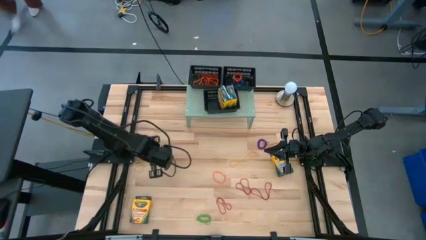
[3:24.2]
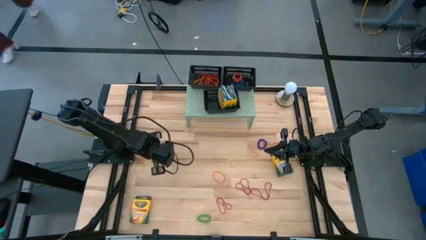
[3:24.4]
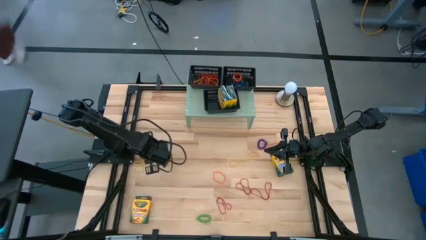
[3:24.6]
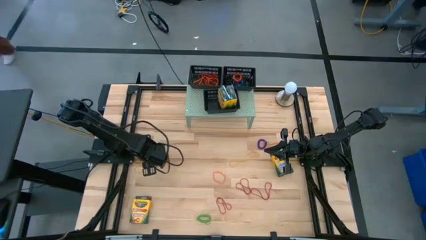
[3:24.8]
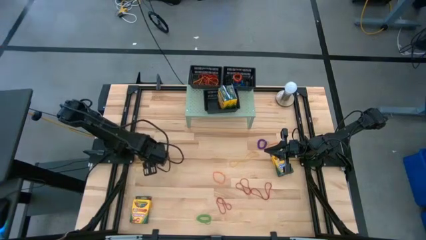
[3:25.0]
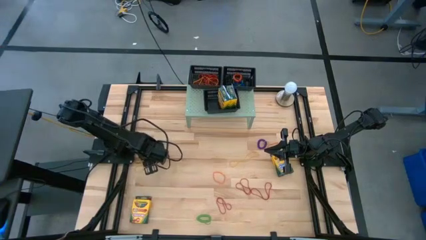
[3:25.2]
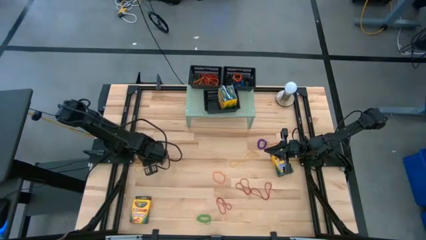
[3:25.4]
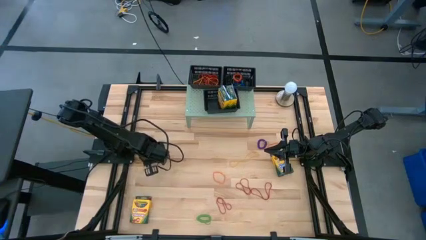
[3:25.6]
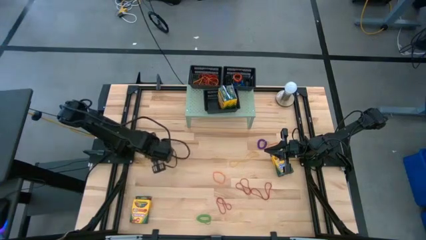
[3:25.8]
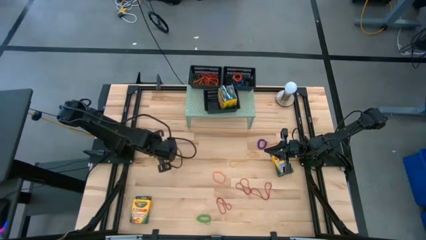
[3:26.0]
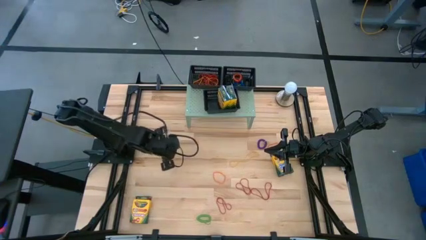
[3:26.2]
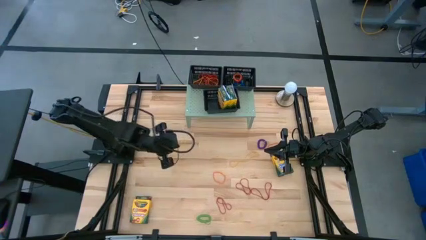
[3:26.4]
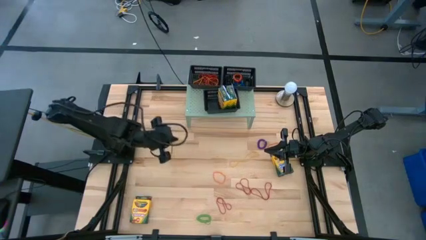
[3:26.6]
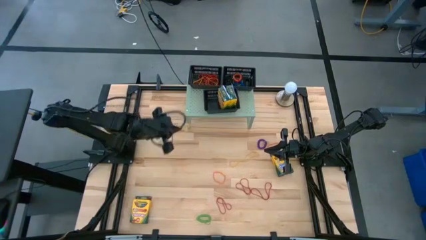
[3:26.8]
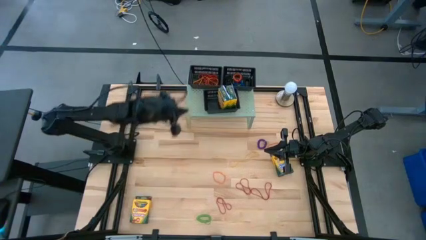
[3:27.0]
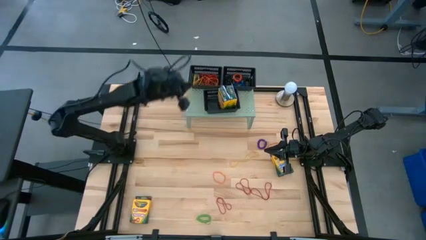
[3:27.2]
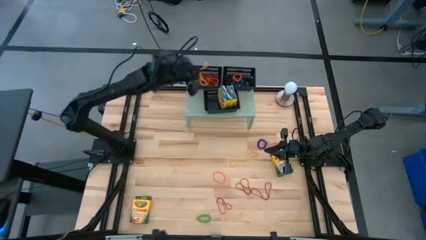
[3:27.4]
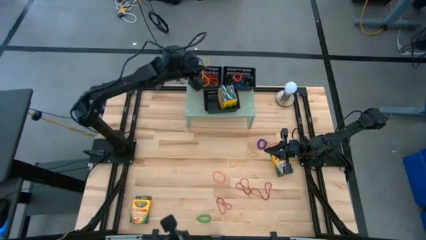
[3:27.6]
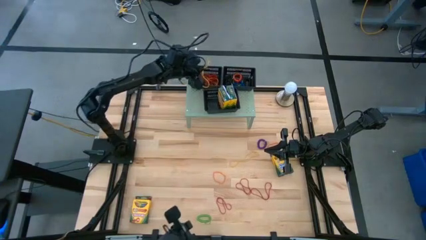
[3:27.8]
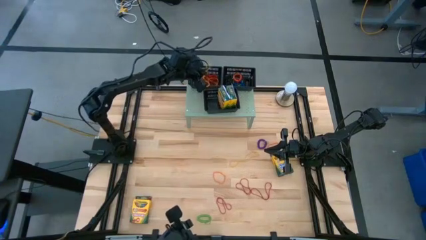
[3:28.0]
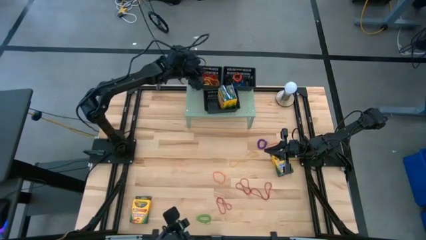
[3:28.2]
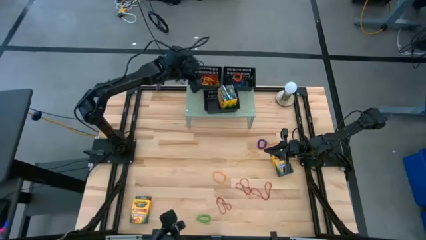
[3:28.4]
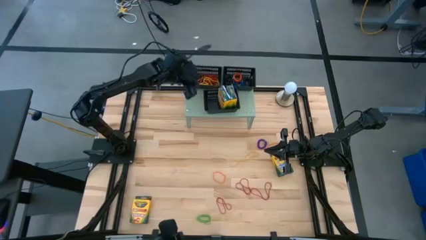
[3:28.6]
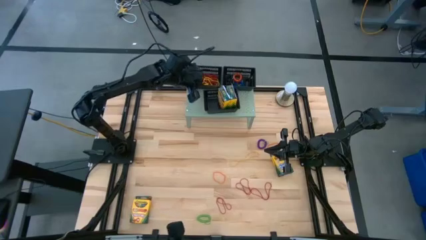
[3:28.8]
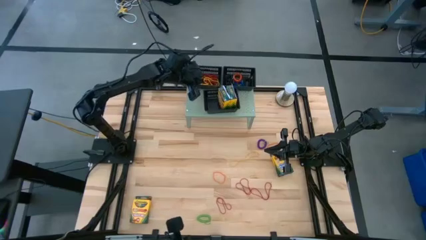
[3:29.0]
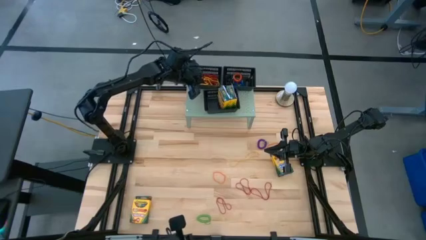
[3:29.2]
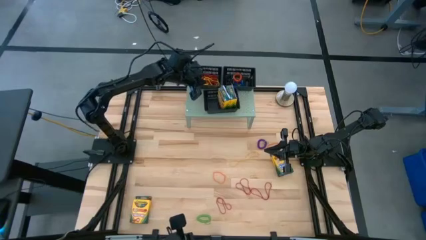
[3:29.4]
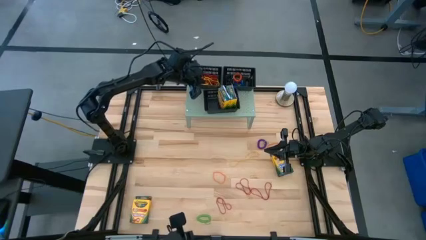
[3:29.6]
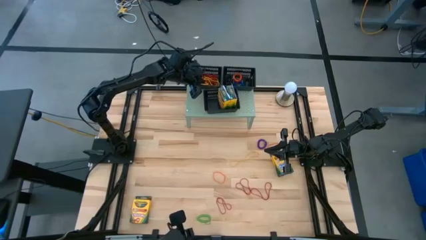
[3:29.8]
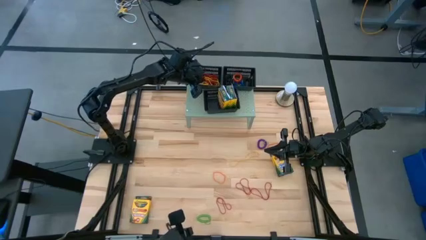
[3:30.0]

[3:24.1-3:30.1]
Task: Pick & Place Office Desk Supplies
Put the yellow rubberband into the top left black bin

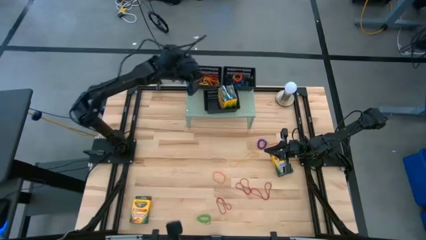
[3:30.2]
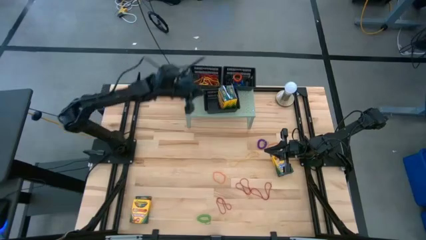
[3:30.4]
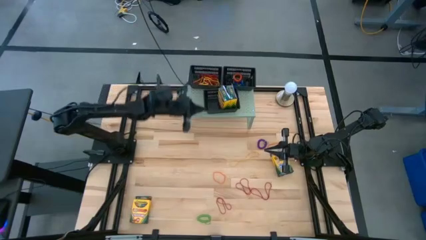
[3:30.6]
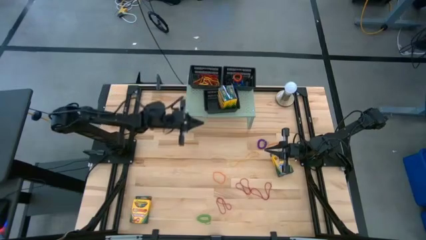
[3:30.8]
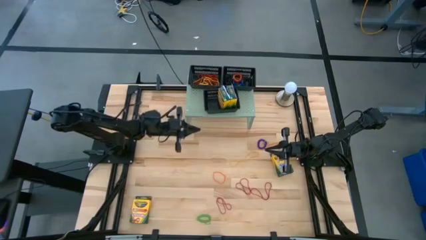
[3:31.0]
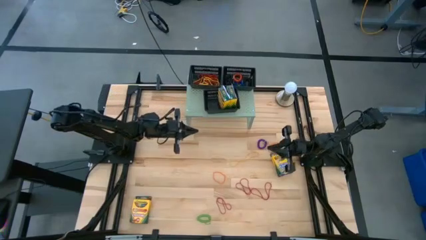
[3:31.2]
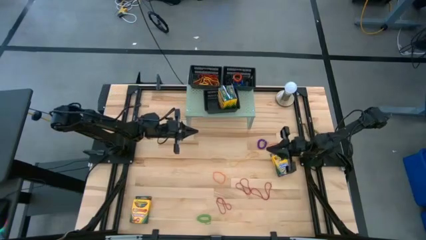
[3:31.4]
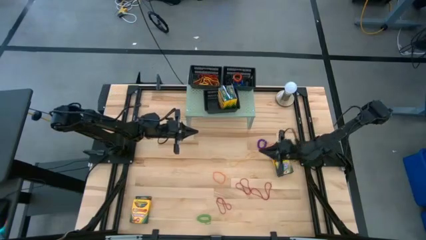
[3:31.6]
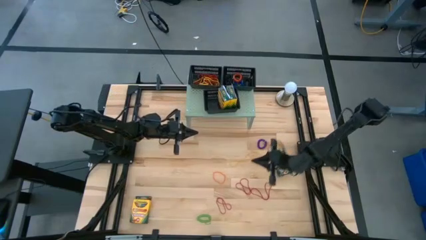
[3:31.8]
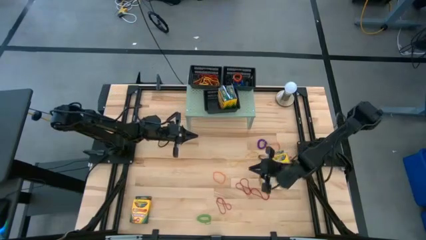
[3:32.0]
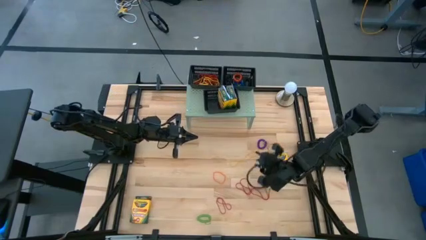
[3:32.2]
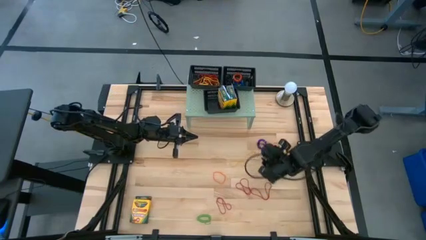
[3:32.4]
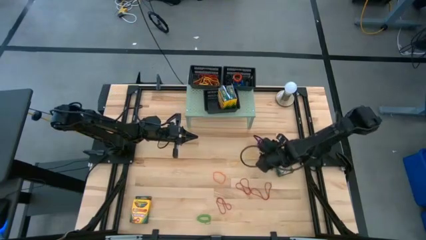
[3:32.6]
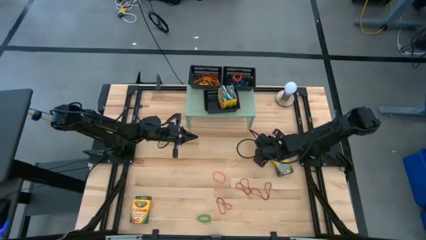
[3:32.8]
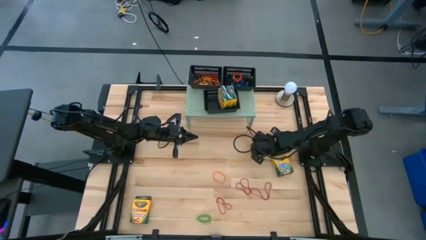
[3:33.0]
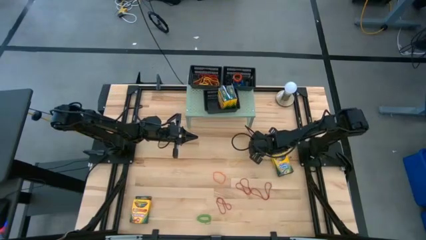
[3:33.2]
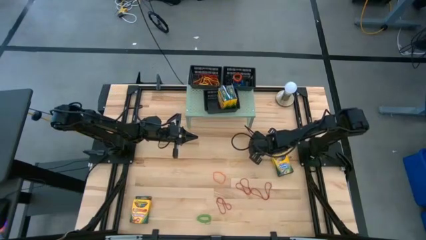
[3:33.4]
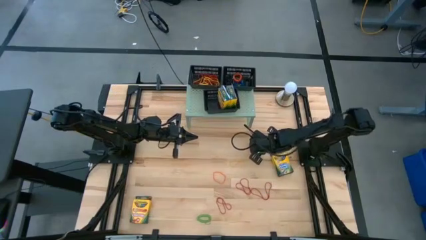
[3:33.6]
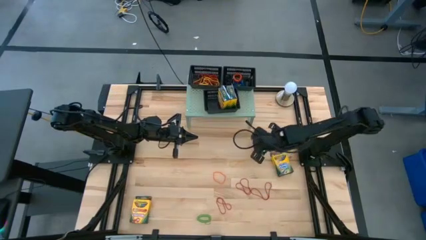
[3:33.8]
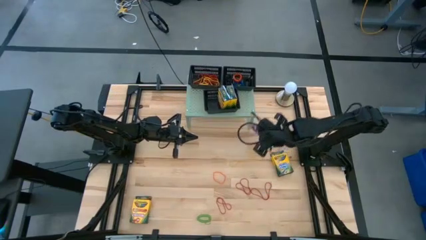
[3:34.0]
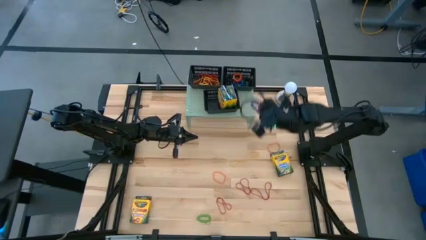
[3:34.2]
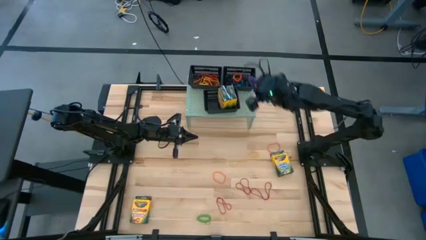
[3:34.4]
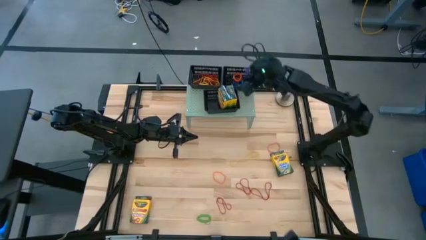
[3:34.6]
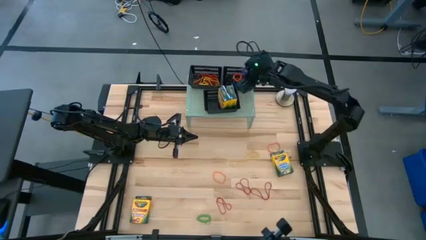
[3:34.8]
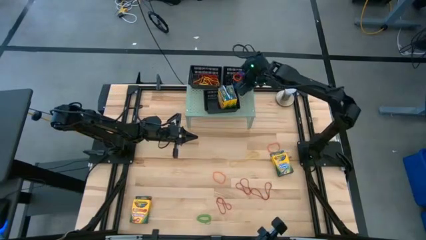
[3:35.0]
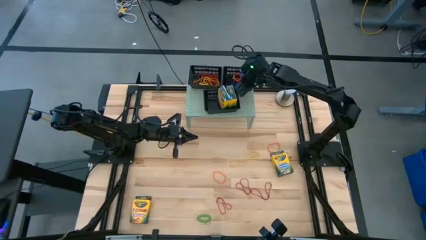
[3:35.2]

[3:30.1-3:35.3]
Put the violet spiral keychain the top right black bin
